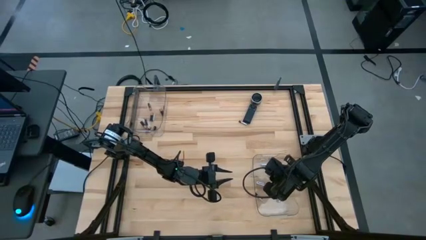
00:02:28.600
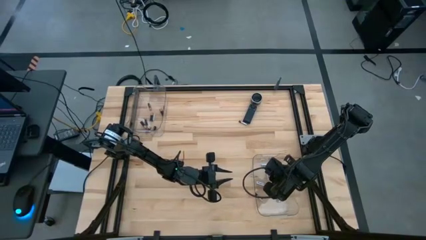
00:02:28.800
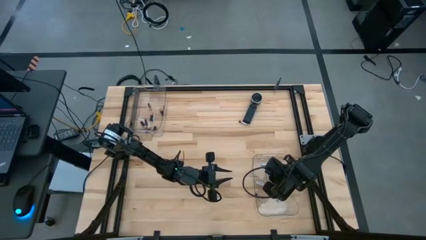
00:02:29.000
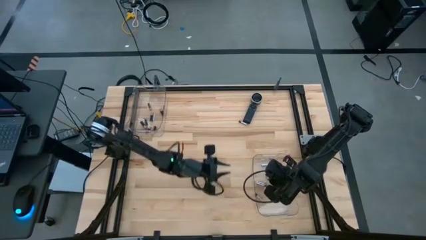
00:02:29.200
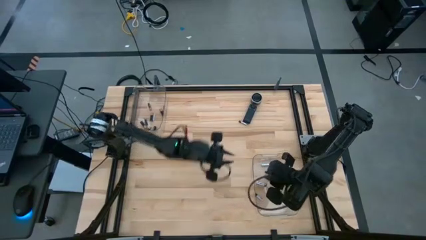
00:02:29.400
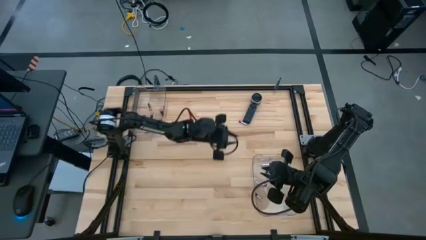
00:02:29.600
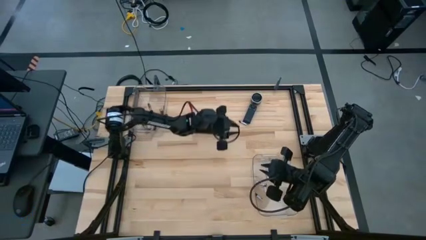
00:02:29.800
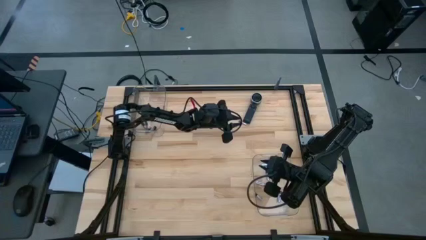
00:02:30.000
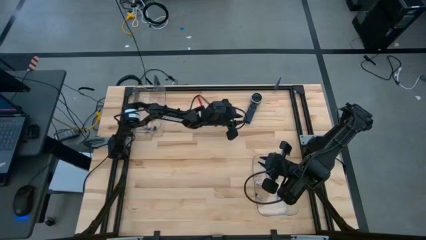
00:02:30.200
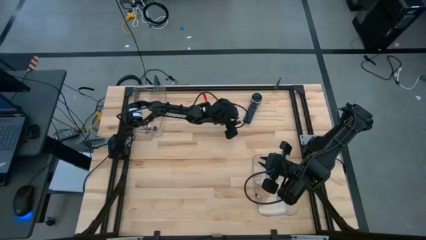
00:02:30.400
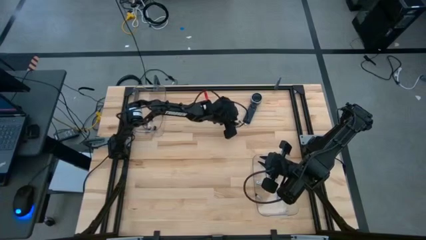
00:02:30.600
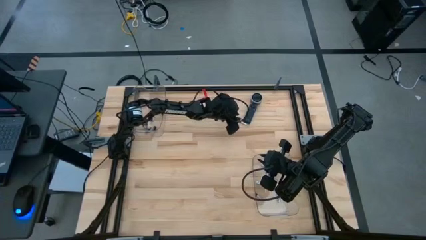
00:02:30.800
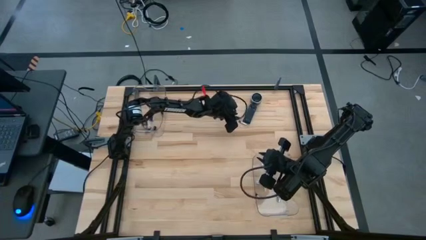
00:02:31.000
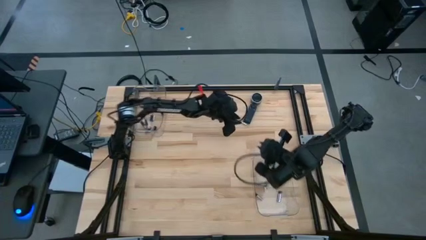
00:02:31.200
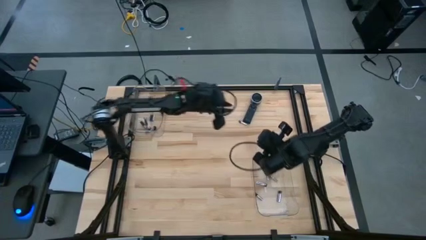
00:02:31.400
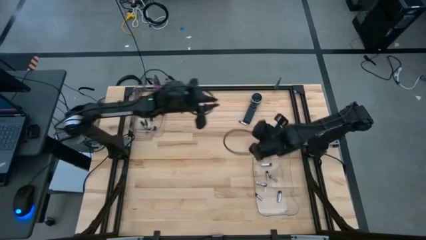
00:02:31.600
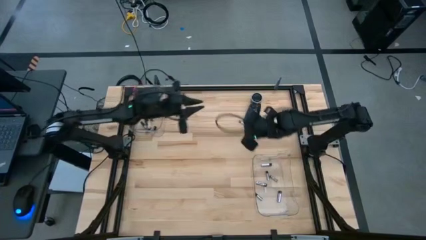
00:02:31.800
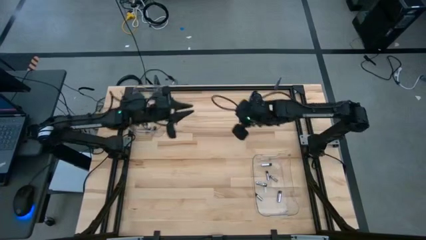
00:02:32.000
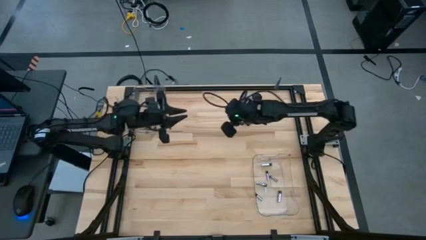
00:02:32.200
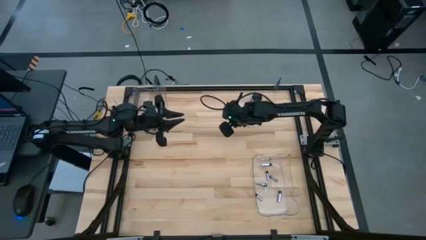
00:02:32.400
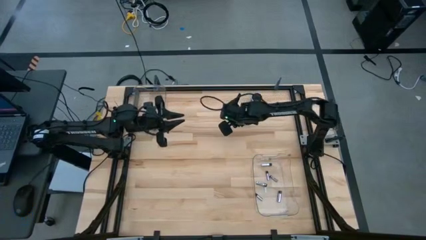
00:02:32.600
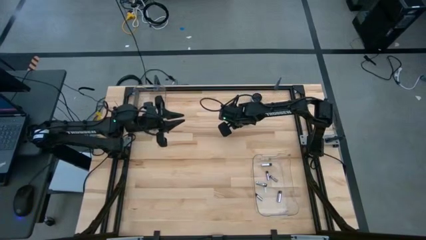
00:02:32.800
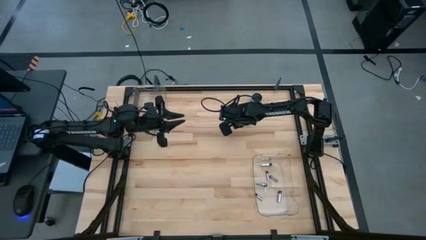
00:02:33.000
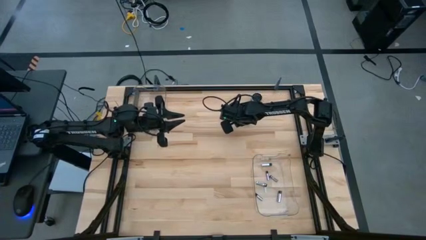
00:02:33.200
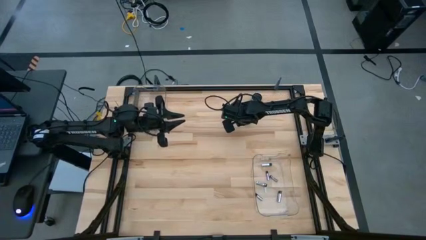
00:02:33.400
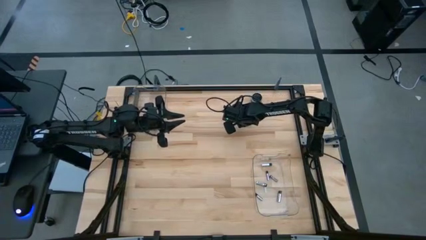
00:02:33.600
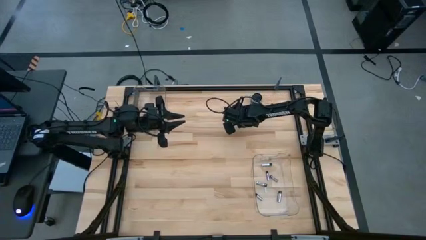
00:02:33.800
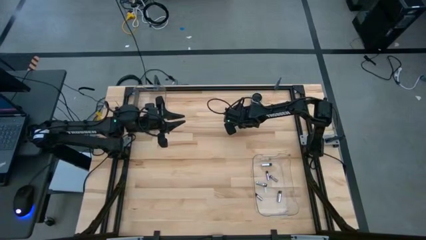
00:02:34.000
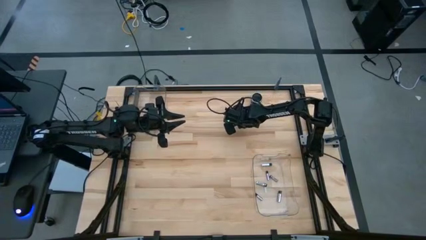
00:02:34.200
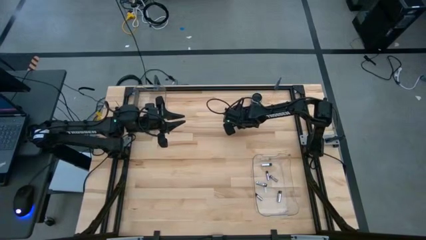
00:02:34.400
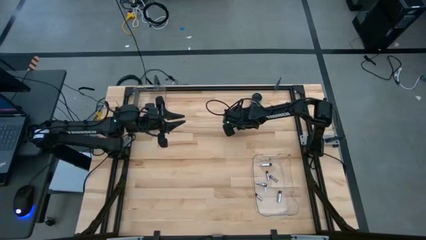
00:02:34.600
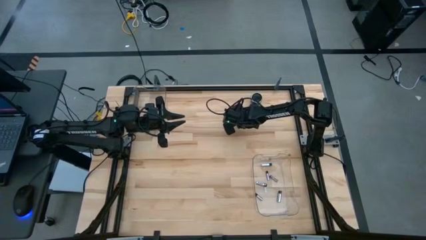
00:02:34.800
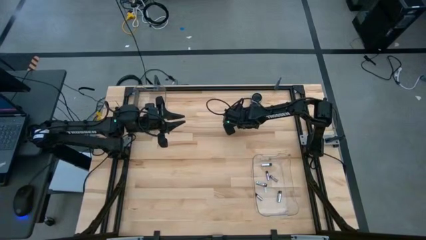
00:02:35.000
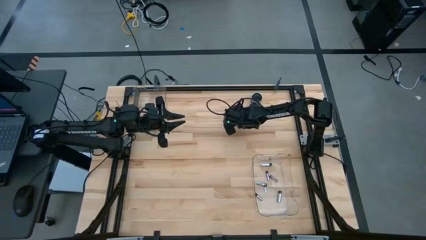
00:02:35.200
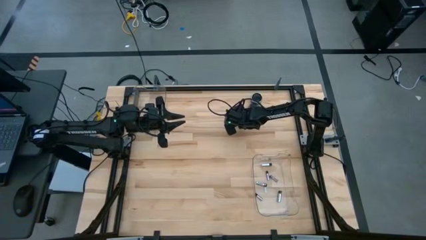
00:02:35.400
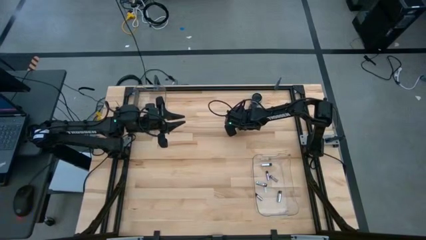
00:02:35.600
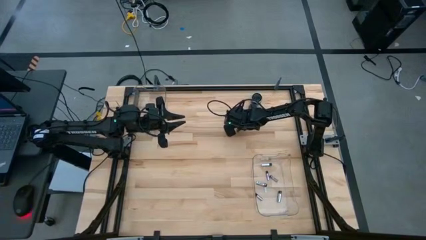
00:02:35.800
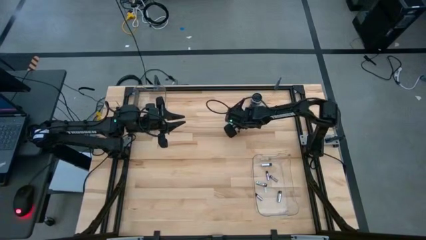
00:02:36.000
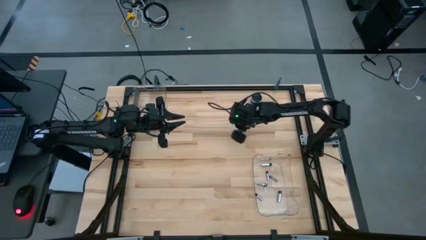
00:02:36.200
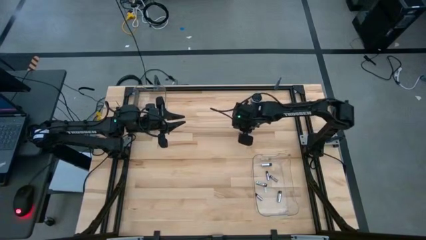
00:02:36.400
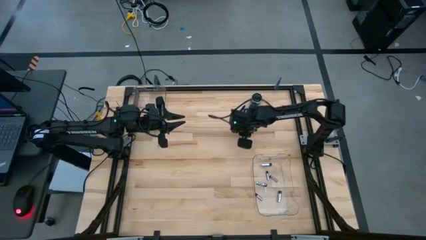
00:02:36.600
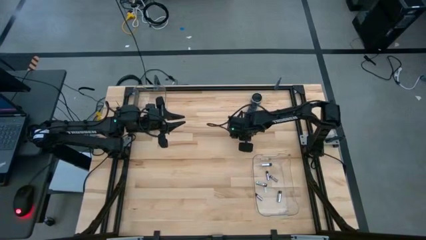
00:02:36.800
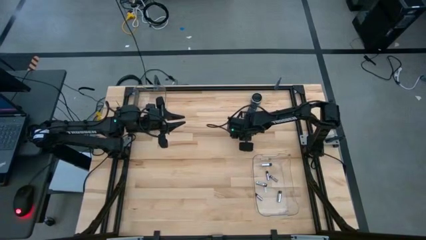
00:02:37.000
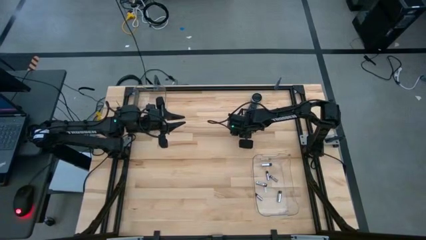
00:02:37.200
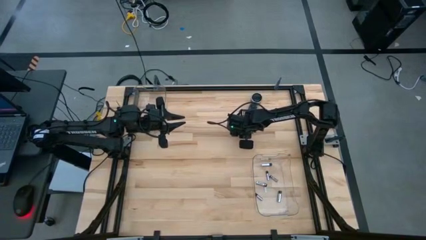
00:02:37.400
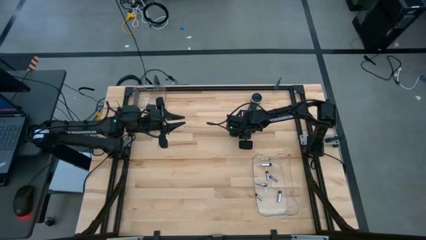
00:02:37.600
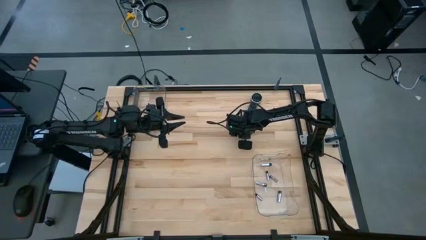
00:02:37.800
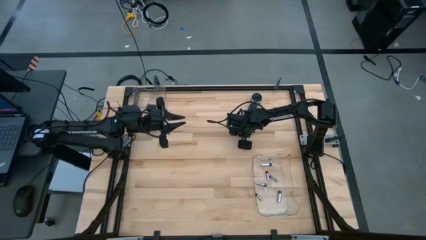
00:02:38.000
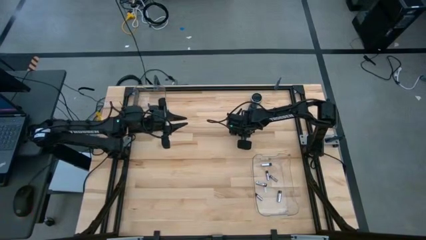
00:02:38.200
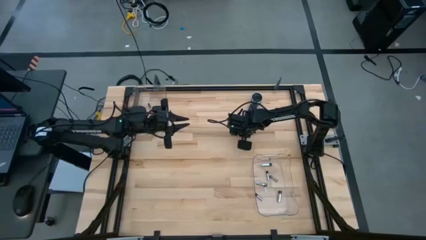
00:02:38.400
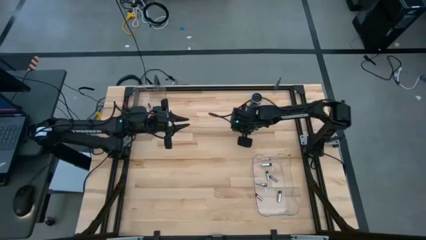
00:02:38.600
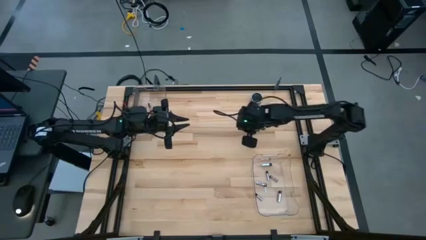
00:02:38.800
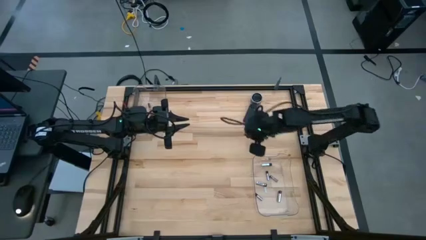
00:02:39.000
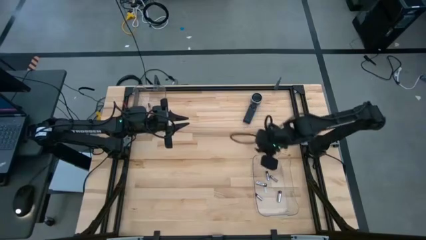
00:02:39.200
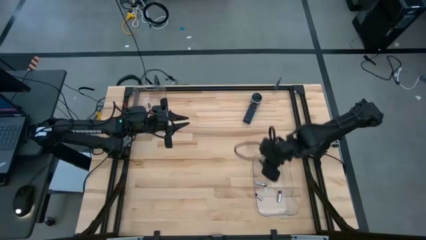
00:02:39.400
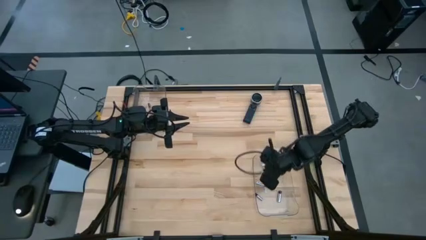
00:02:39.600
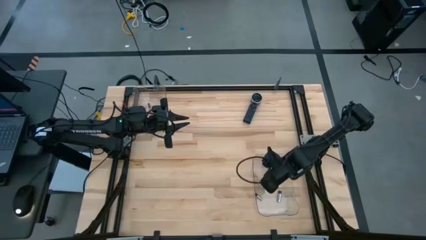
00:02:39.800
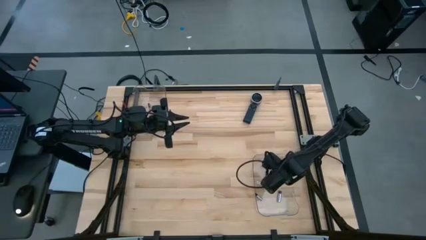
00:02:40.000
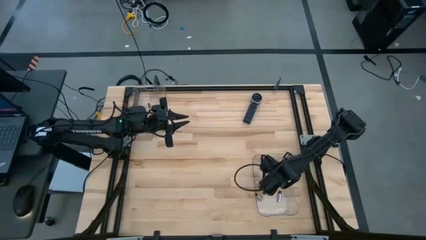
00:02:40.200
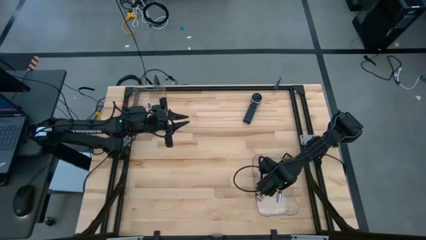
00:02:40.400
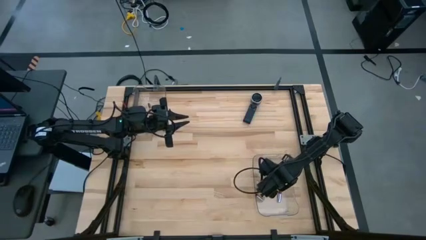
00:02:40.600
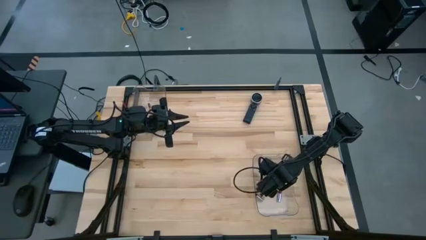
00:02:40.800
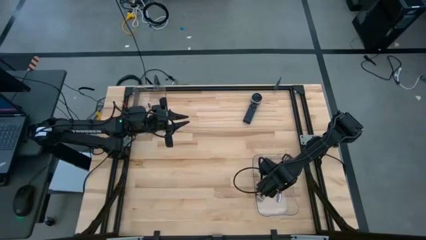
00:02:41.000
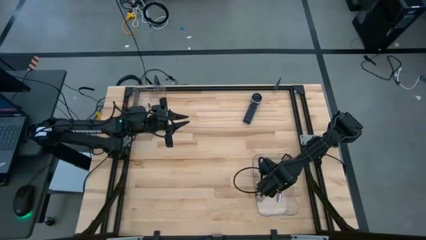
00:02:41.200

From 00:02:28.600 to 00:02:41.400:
Task: Sort batteries
Put the silver battery into the bottom transparent bin

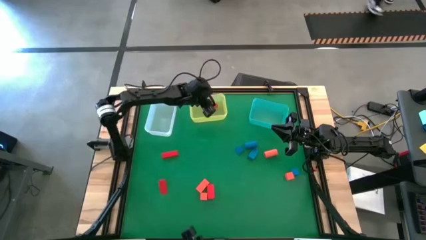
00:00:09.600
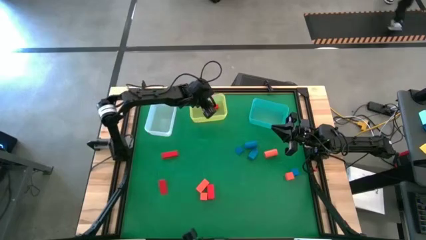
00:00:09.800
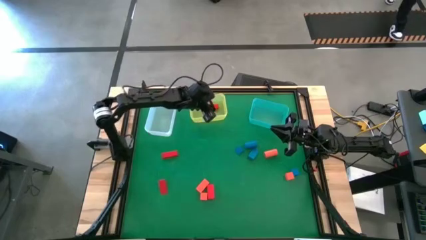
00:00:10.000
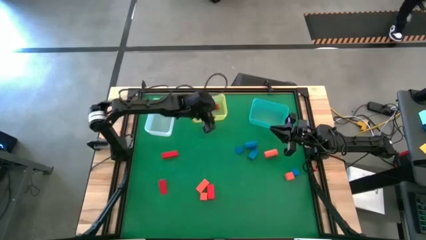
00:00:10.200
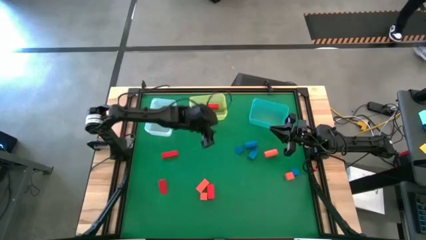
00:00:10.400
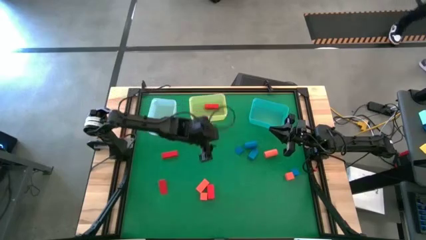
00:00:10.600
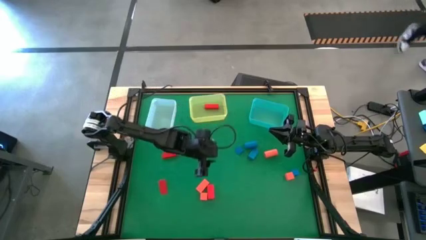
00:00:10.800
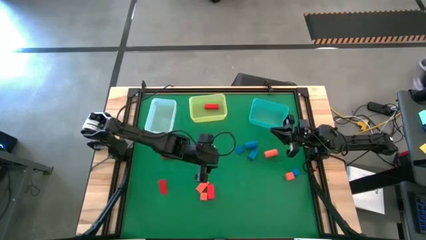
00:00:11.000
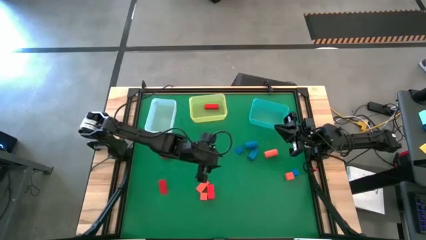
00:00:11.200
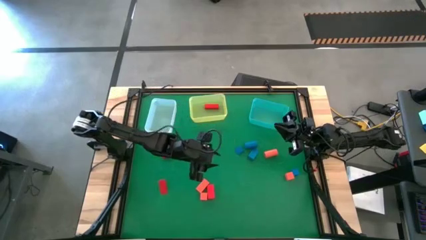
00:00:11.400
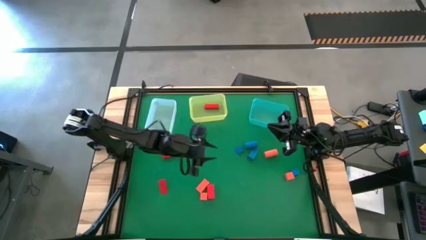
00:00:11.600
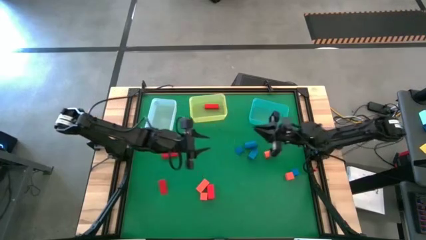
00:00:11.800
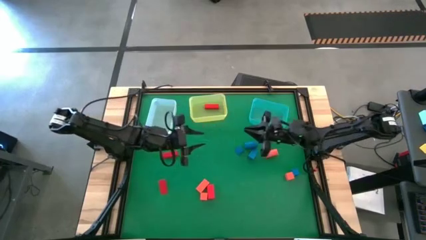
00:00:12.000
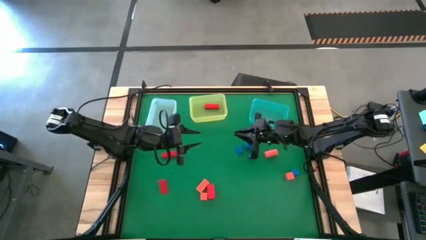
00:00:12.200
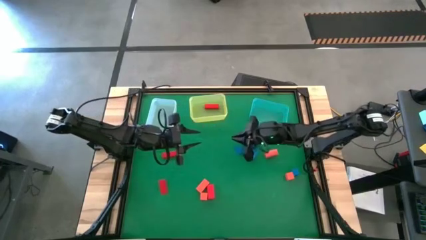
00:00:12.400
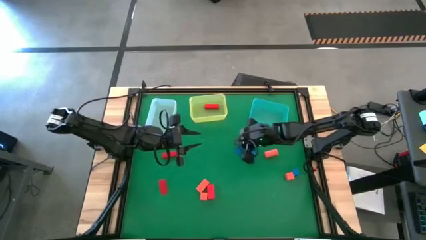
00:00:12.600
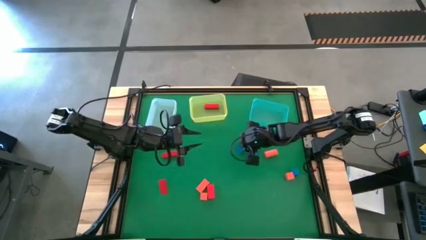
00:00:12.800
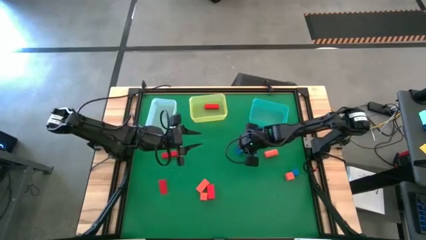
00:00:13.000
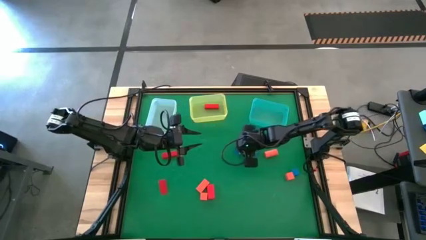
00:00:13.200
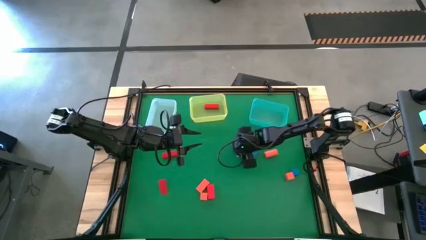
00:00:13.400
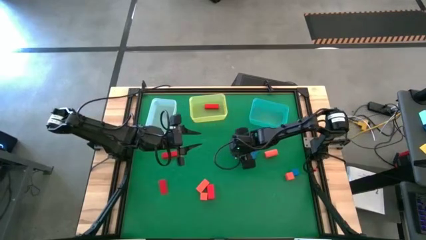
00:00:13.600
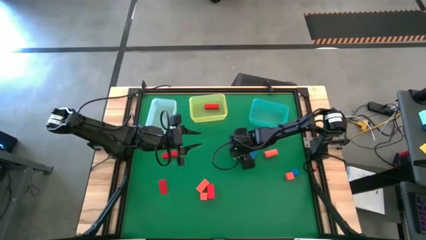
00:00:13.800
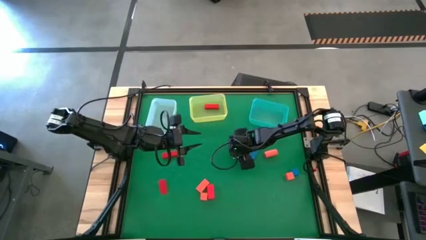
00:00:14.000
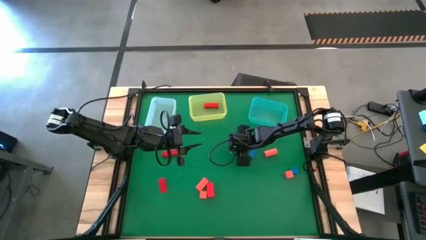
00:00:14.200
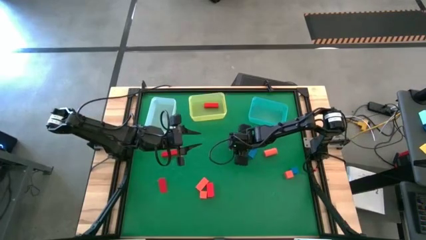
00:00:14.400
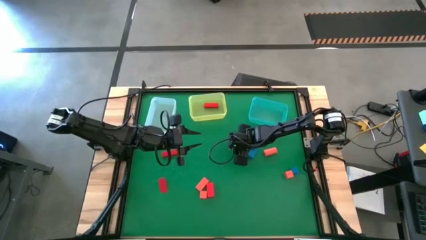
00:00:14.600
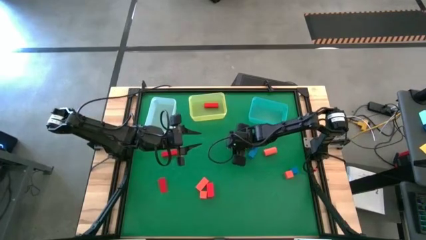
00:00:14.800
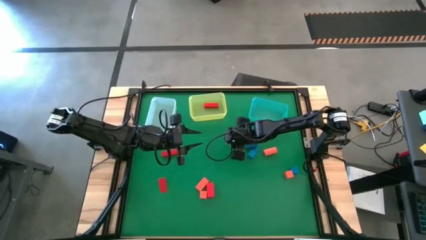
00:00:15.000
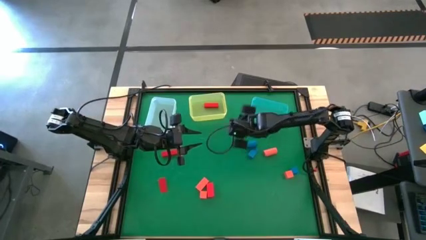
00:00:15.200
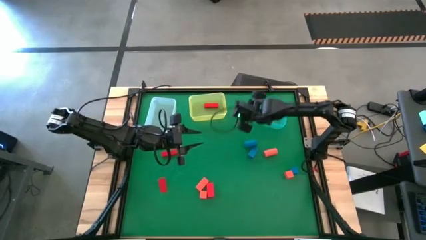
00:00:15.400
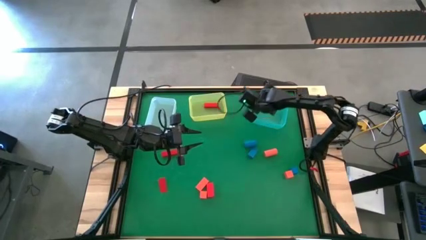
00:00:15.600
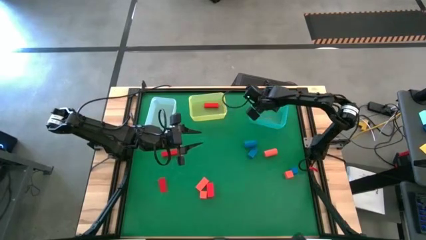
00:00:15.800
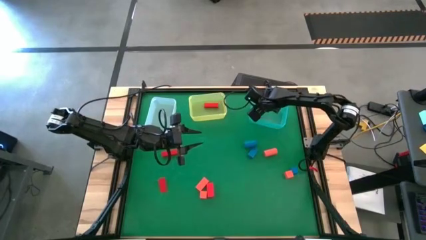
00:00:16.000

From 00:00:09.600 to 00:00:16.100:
Task: Sort & place blocks by color
Put the blue block into the blue bin
